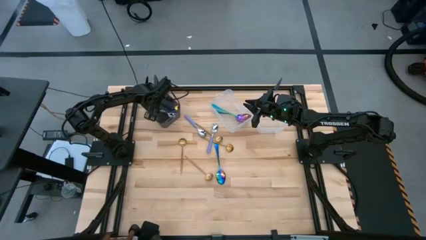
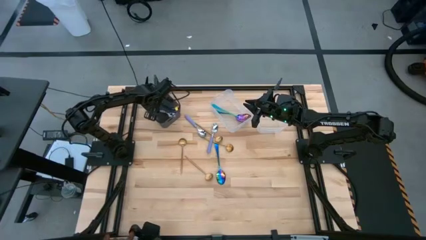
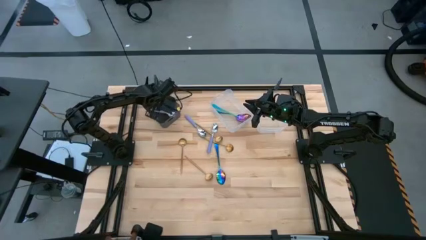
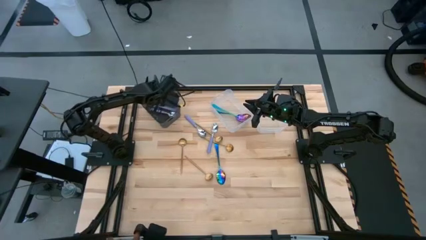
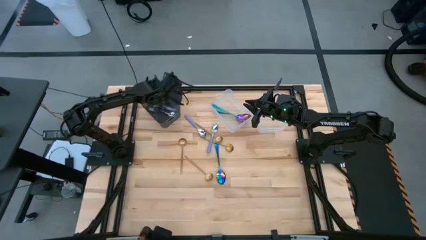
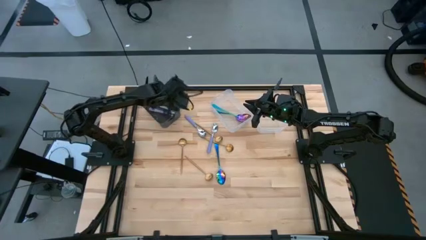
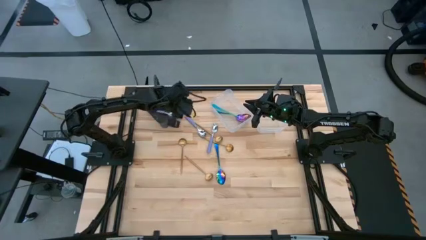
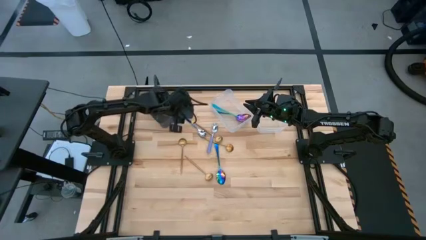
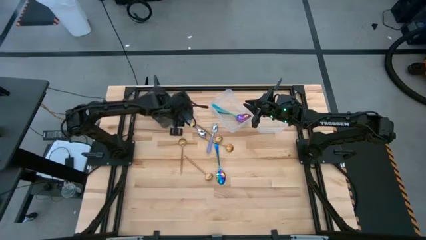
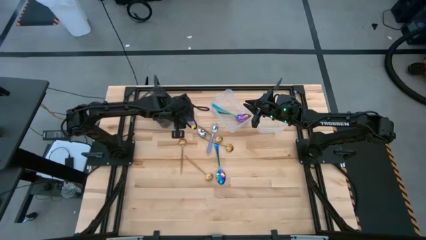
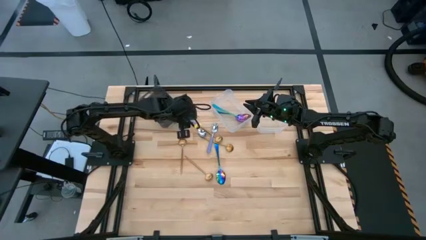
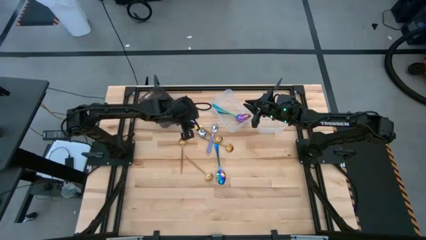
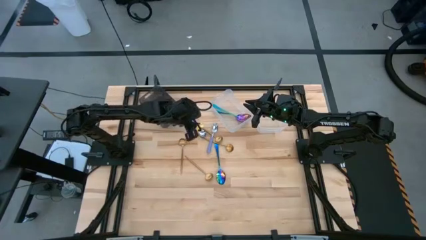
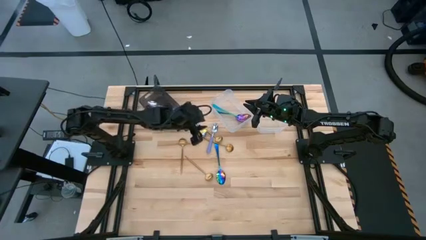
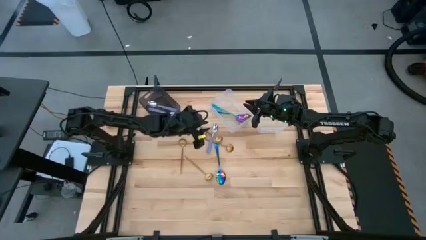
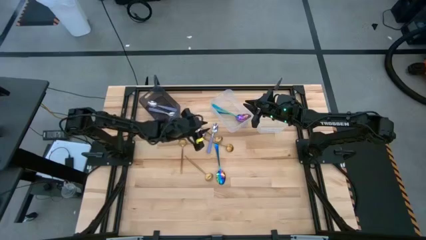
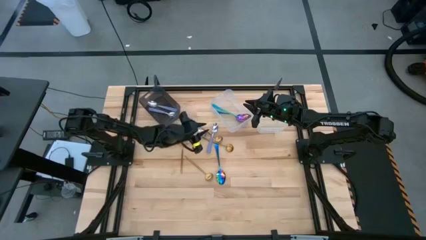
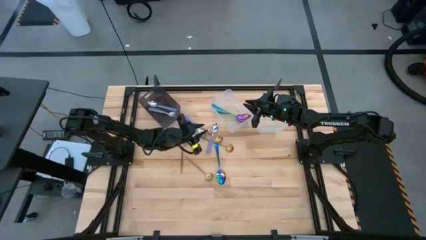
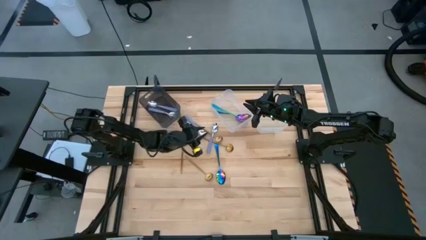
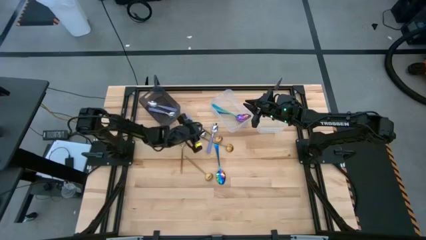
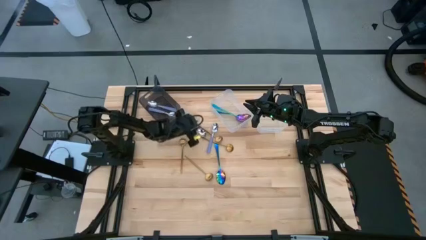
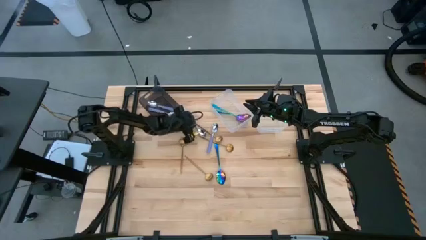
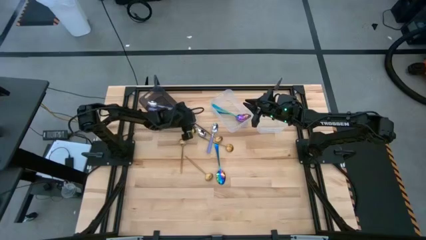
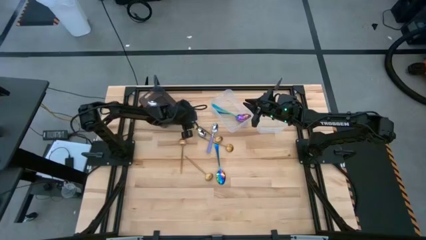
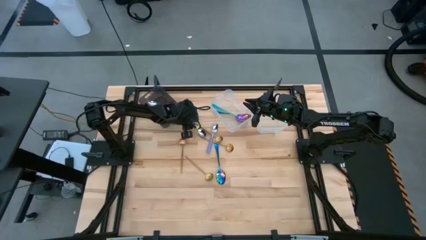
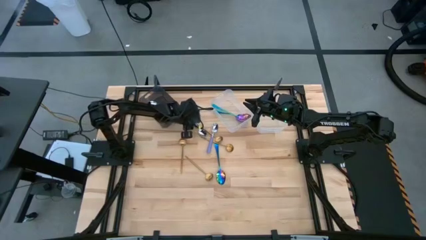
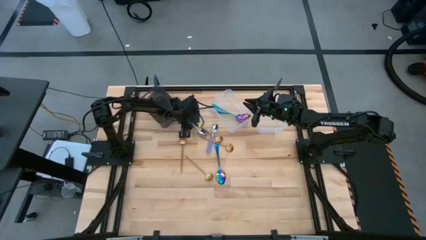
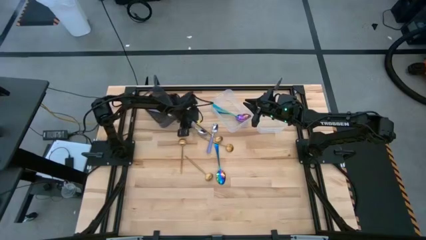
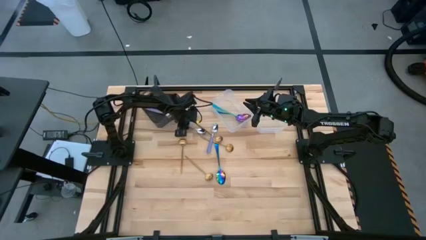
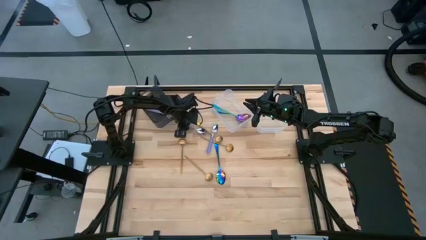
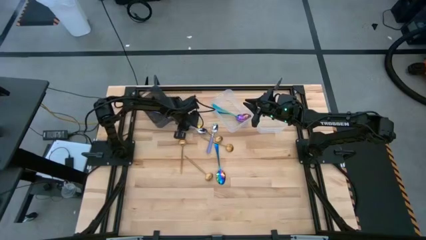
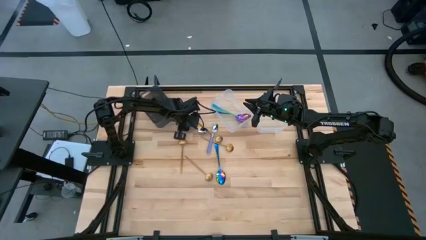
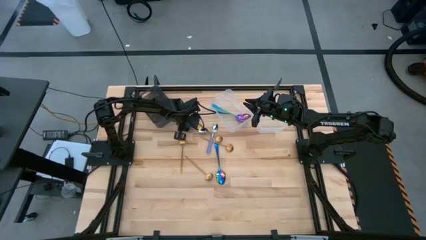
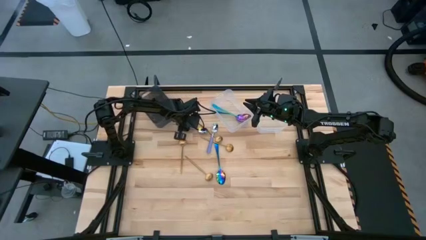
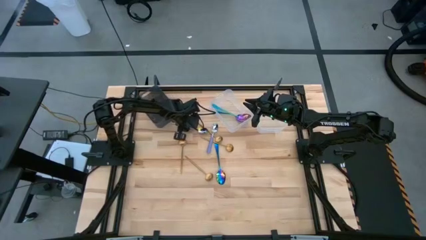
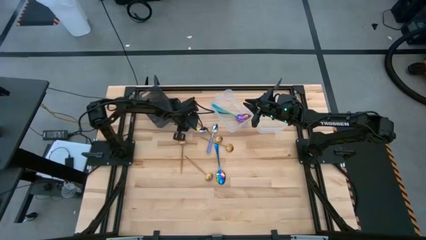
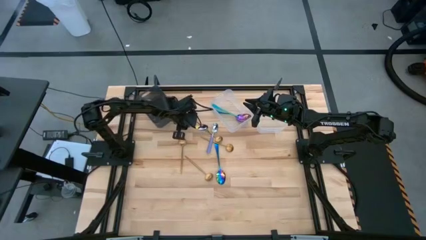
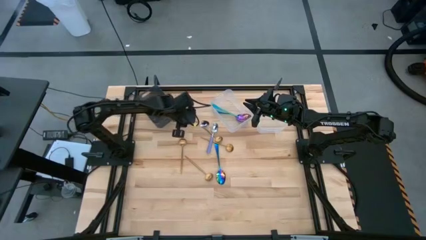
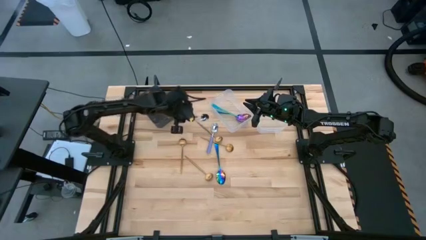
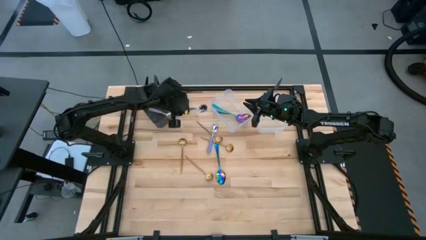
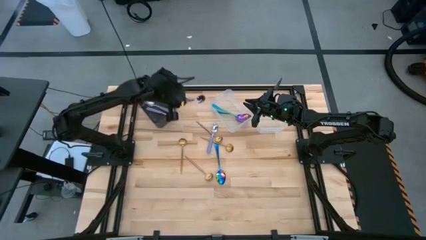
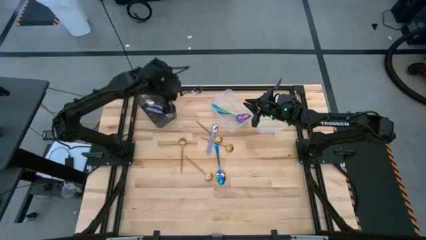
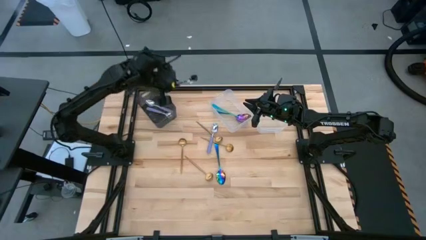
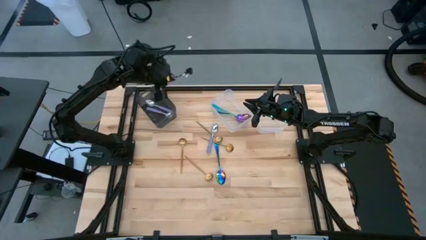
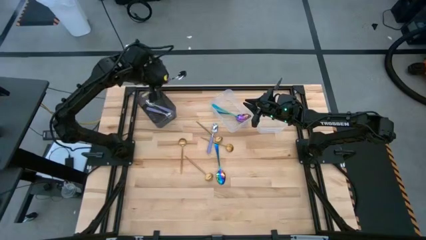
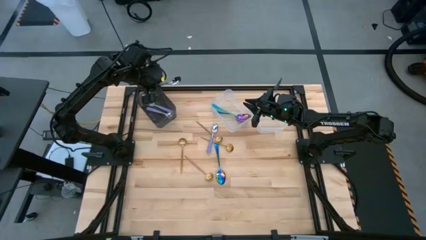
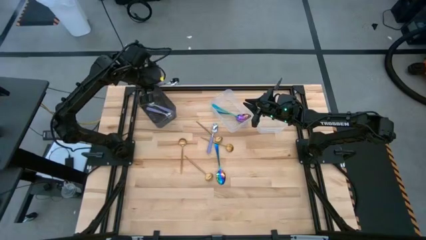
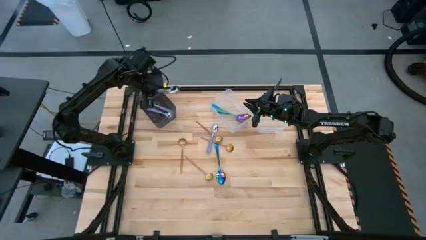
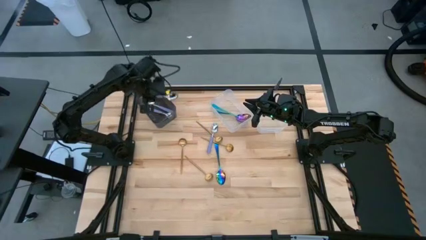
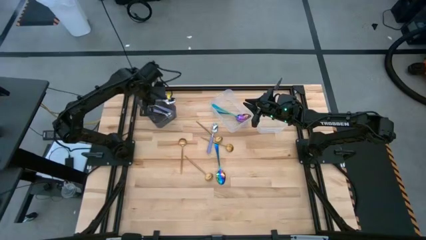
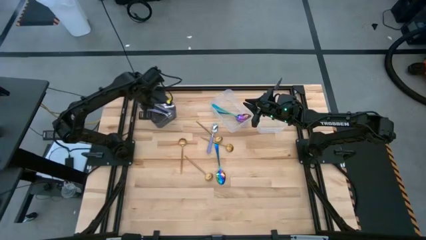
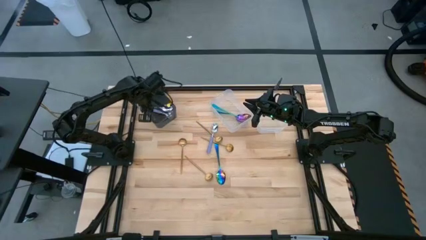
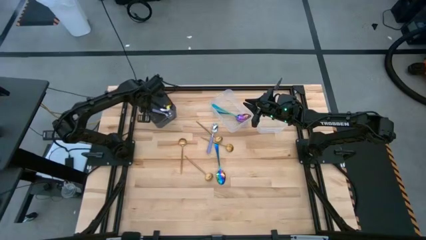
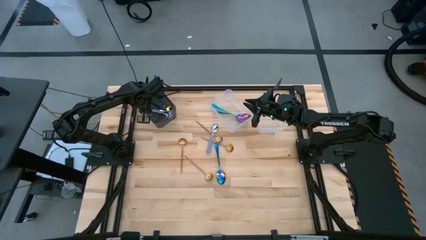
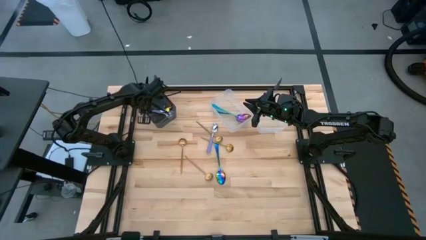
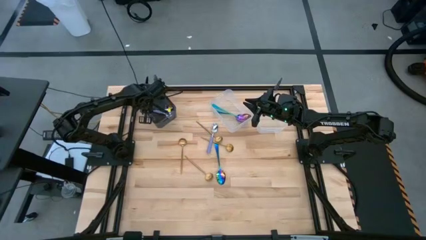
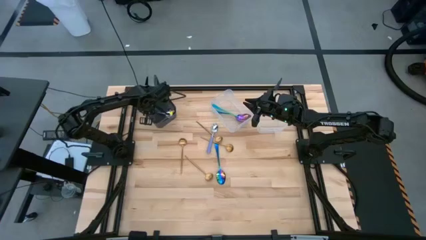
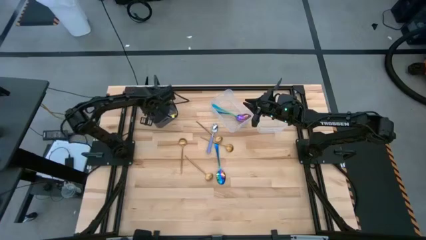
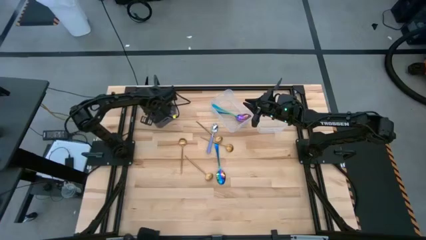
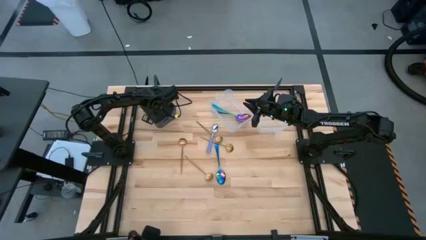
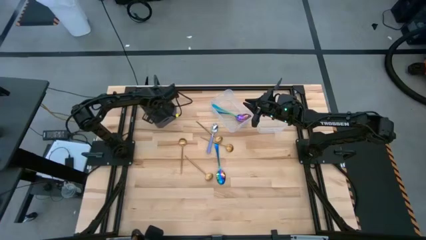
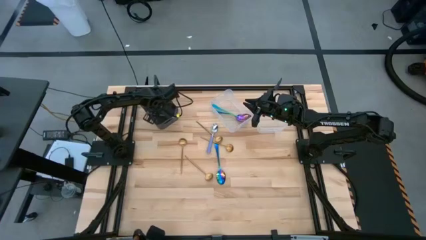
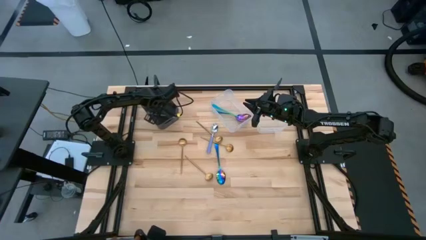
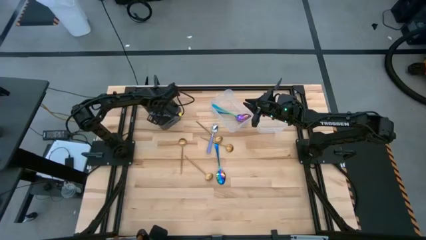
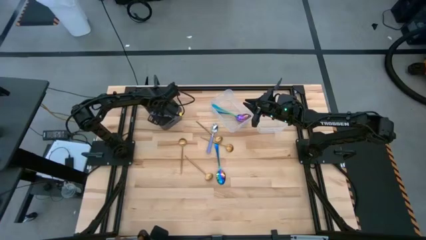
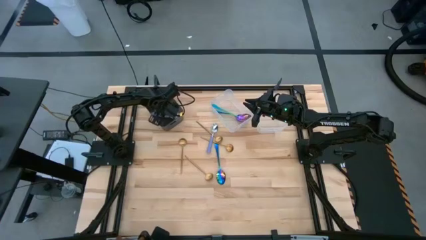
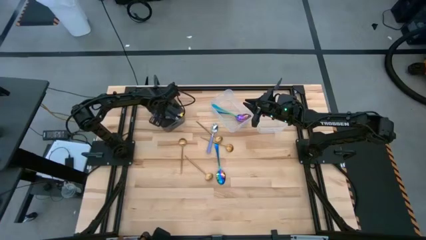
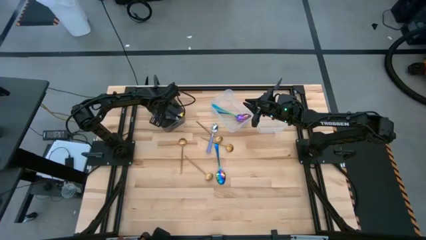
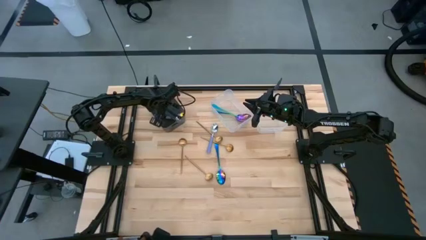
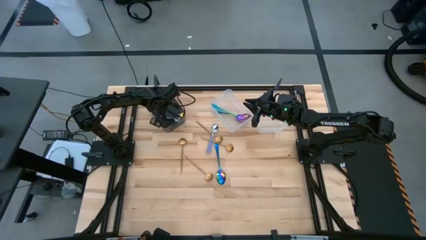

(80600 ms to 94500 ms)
Task: Sort silverware by color (type)
Put the purple spoon into the black bin
